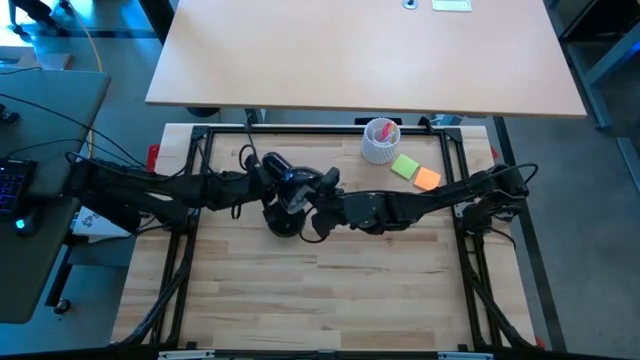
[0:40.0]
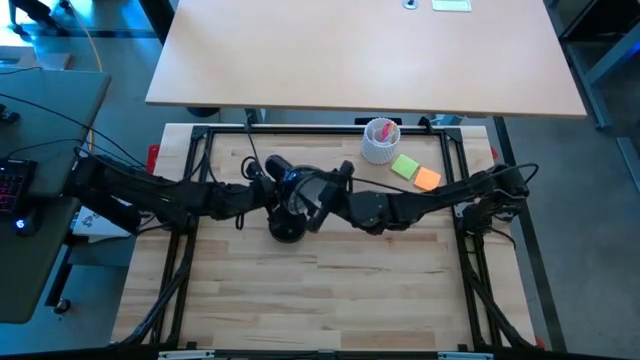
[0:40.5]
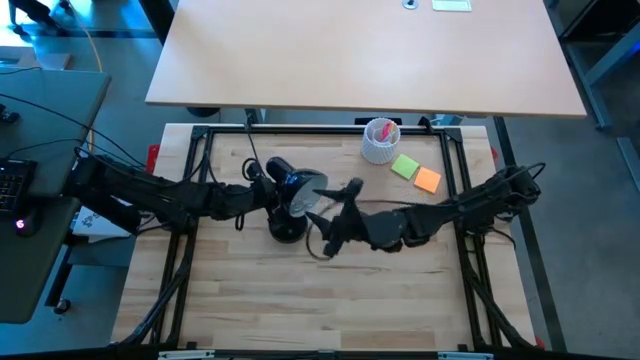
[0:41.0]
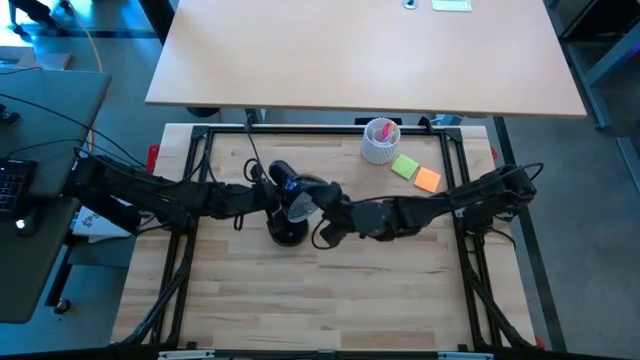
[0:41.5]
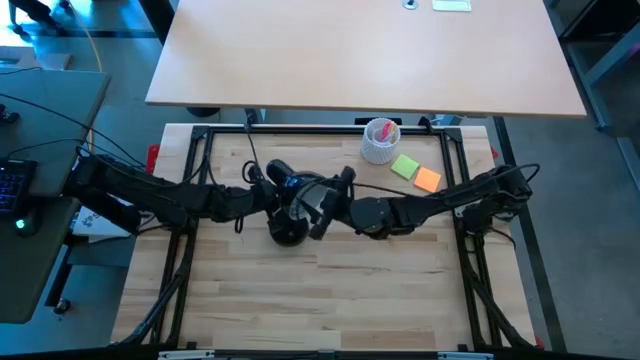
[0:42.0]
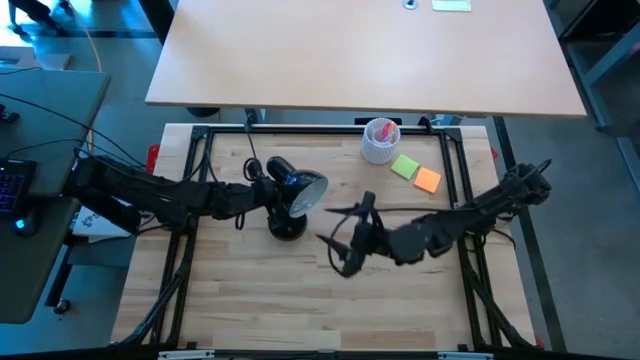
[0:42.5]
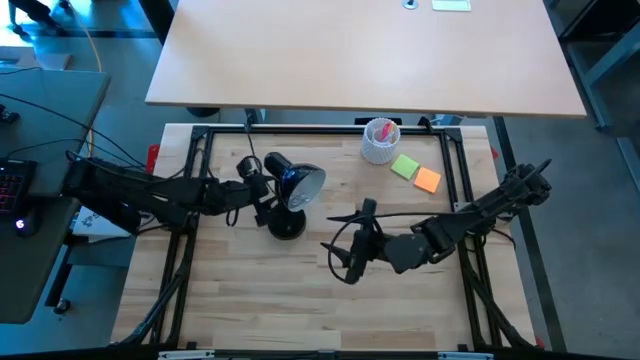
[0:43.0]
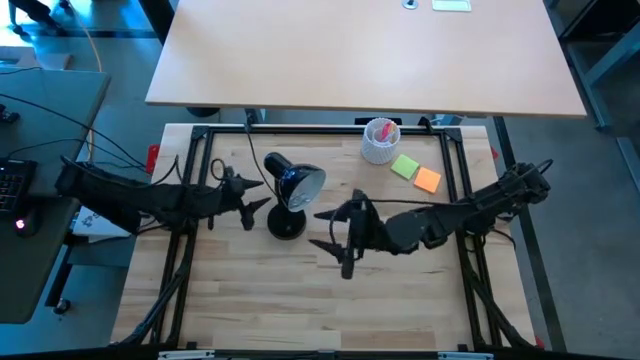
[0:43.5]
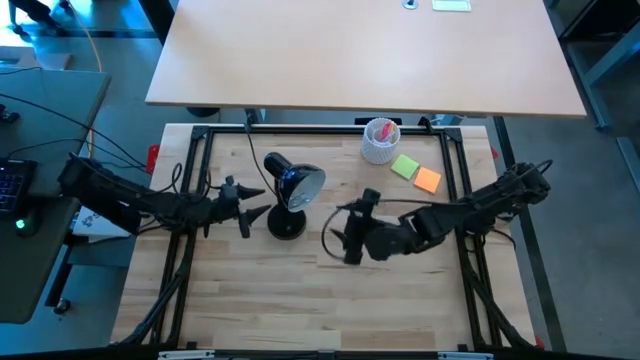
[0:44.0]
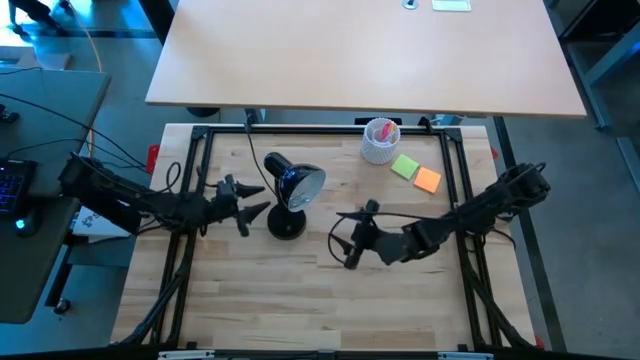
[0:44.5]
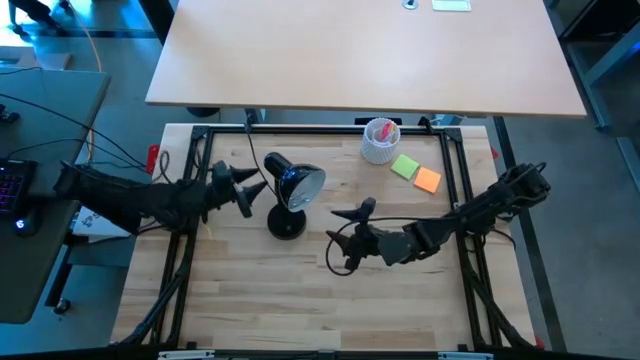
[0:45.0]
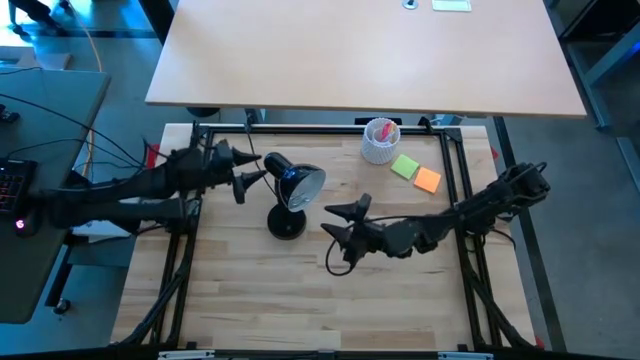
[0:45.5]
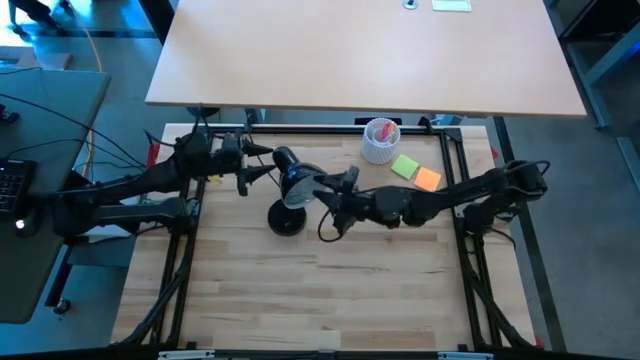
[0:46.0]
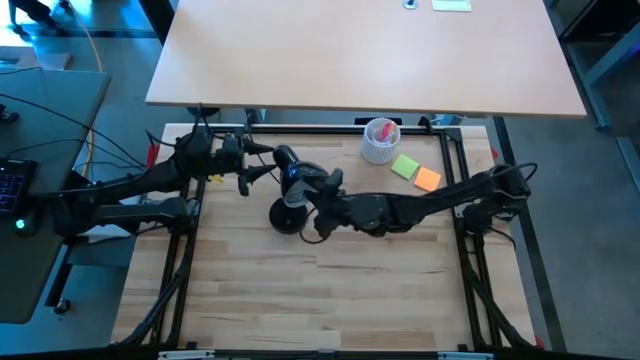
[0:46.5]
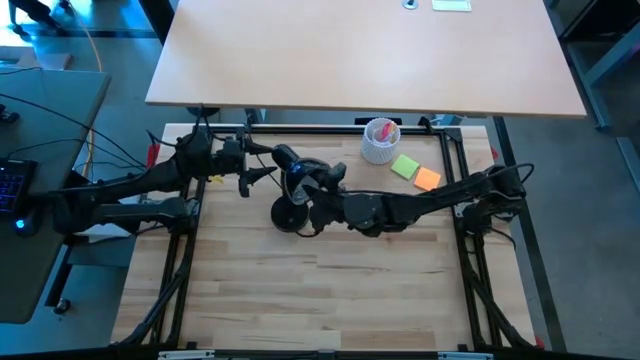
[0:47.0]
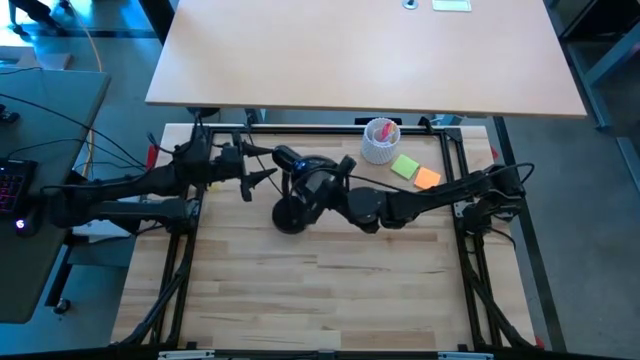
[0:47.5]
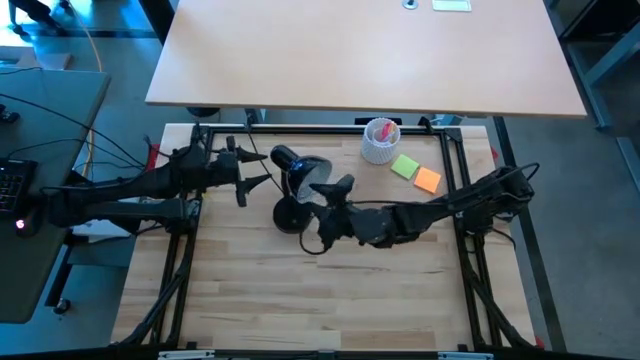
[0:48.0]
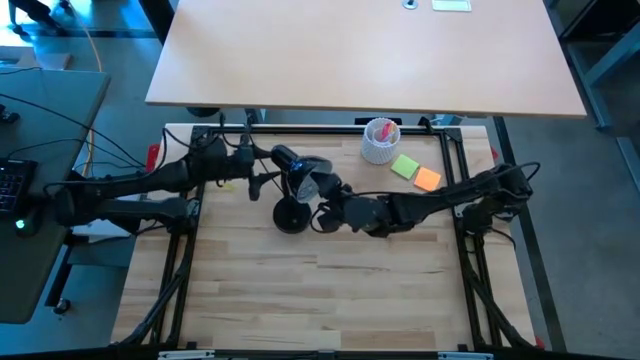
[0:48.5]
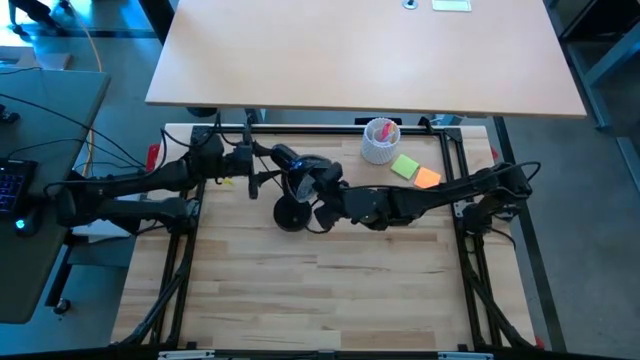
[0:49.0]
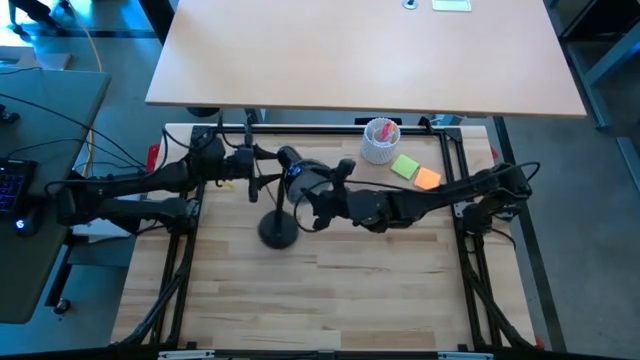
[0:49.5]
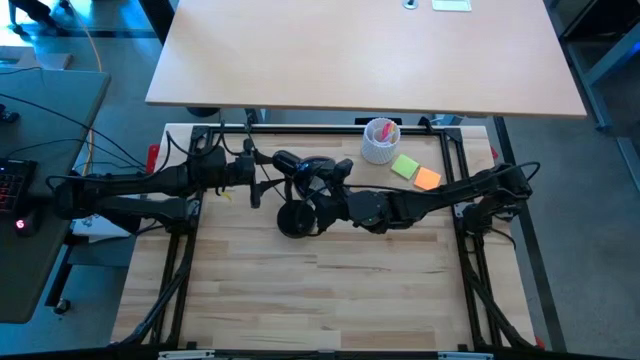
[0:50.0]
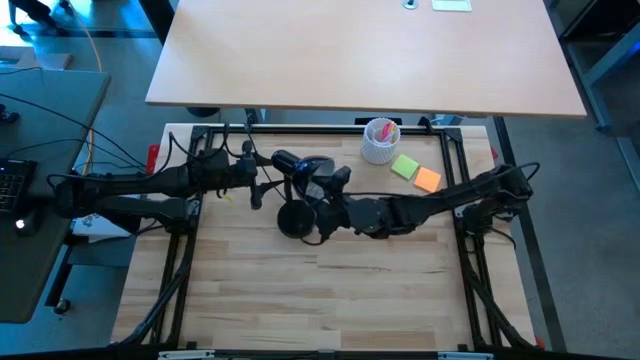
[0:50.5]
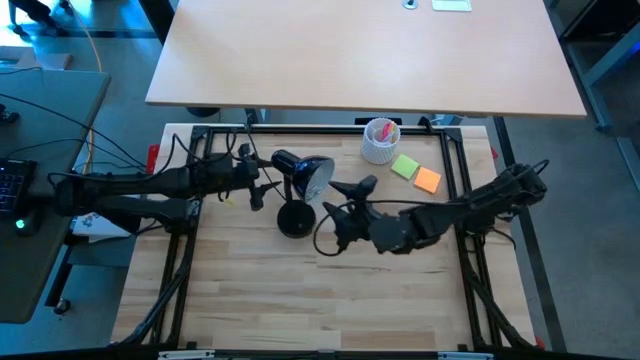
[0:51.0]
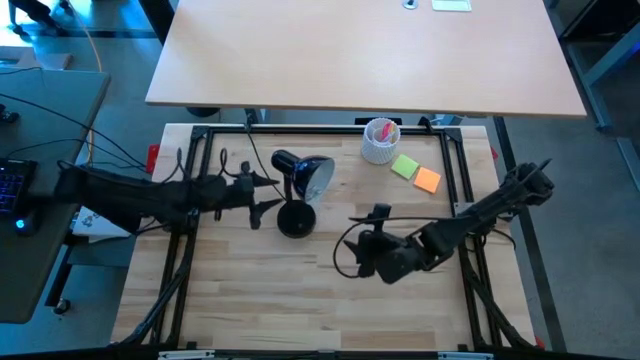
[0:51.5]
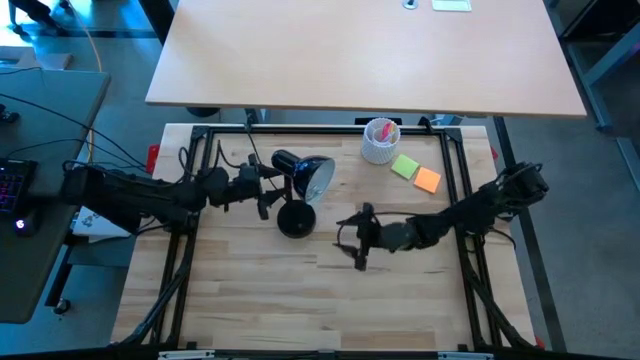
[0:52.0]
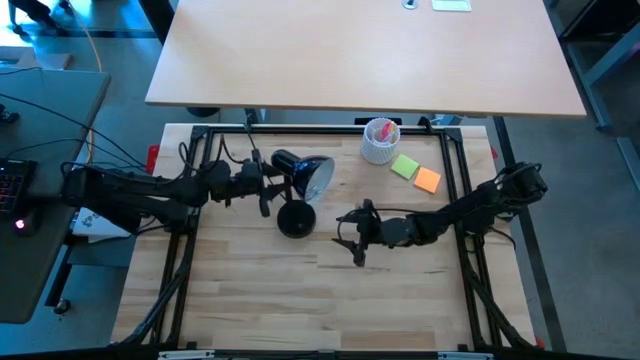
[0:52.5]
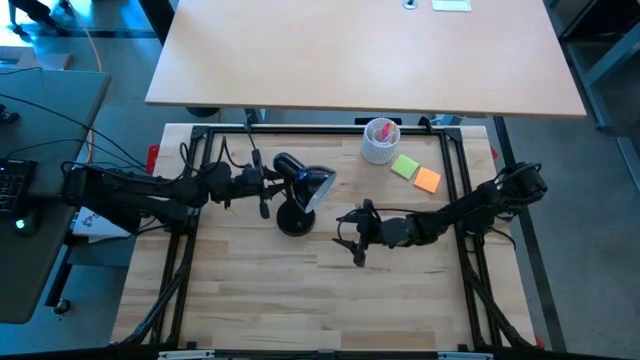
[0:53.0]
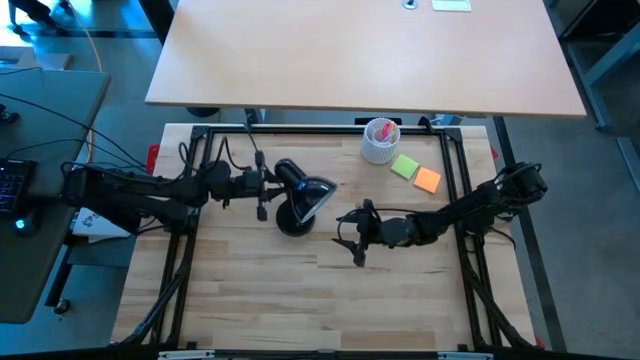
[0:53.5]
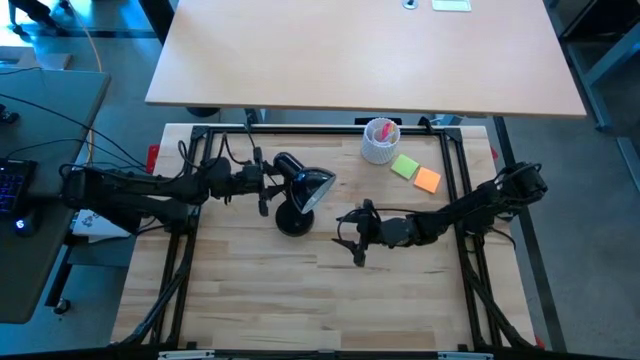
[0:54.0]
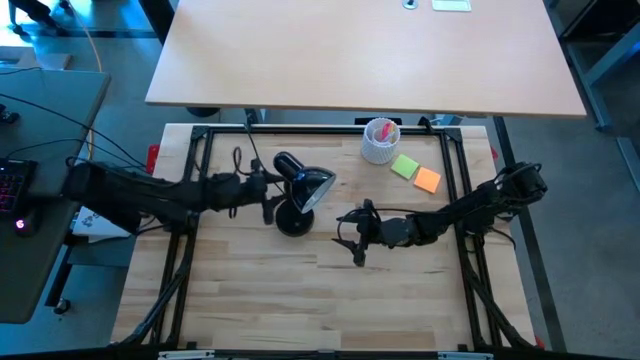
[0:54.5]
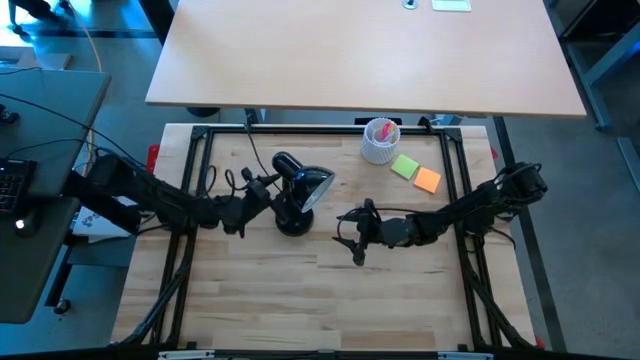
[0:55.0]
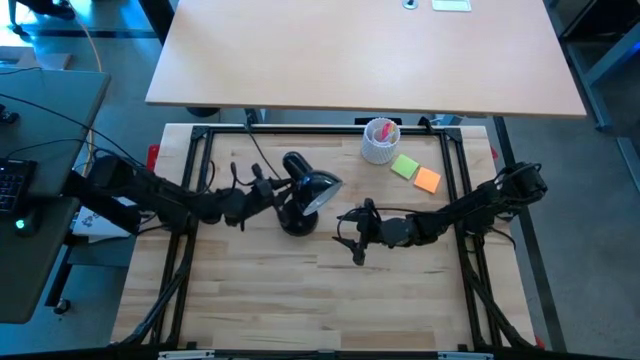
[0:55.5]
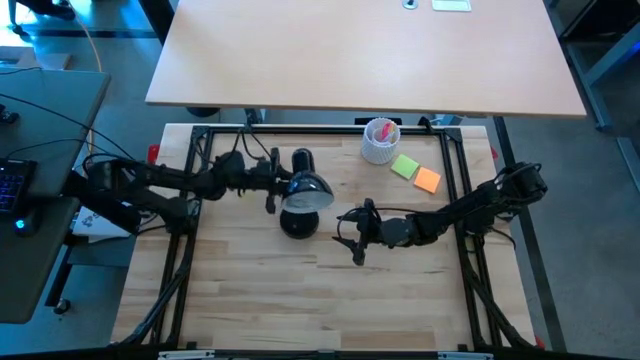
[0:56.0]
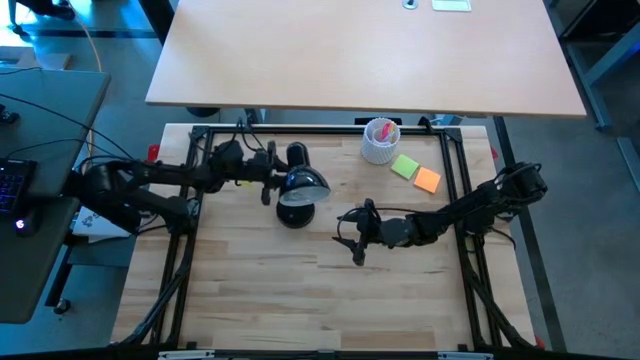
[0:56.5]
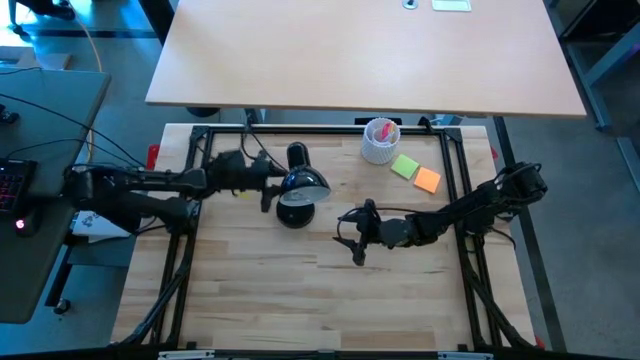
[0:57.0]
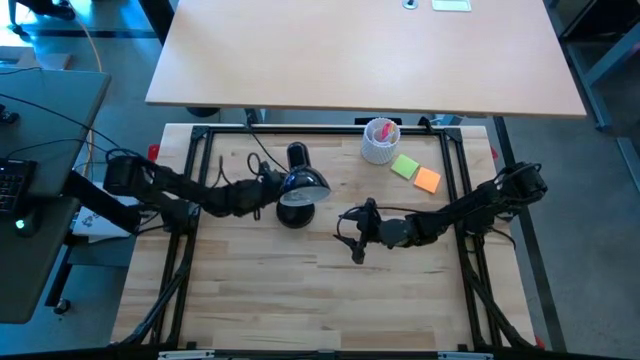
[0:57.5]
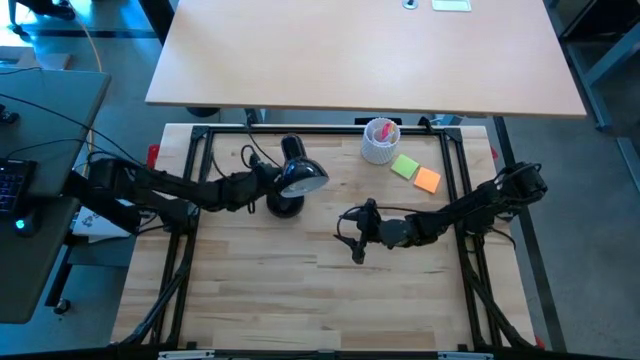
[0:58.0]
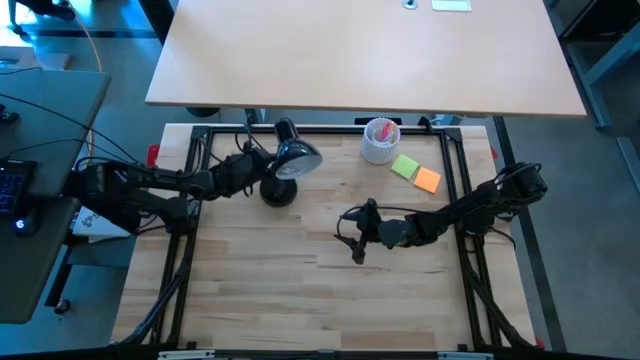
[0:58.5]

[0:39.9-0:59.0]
Task: Screw lightbulb
Insert the lightbulb into the lamp

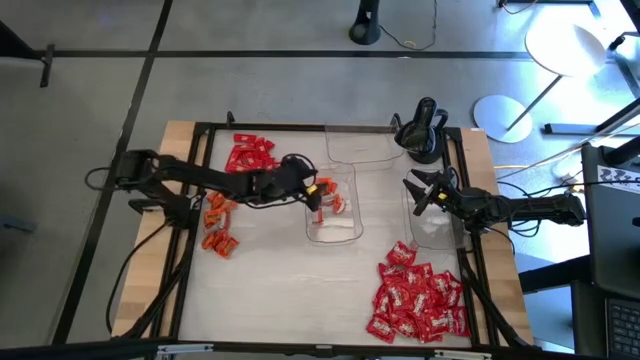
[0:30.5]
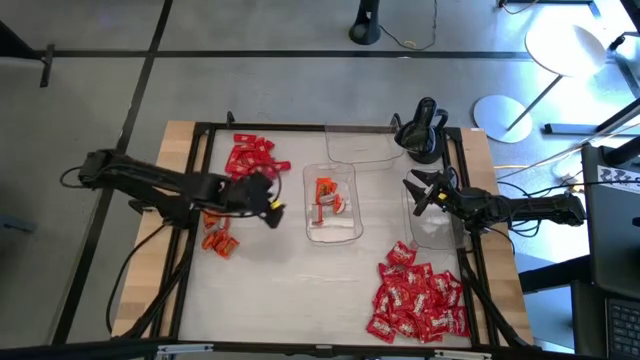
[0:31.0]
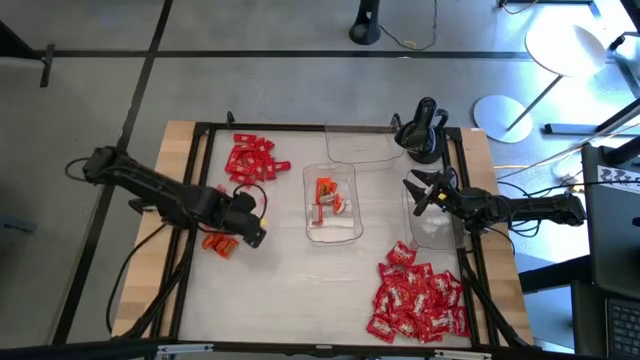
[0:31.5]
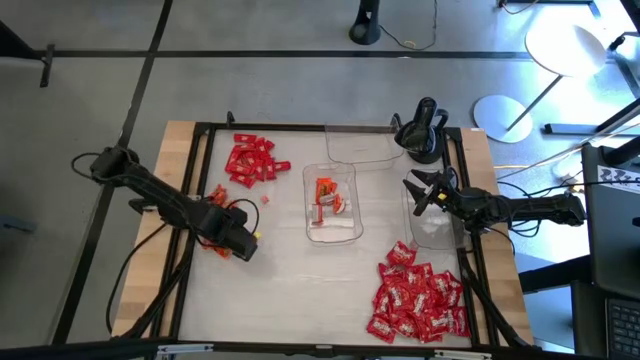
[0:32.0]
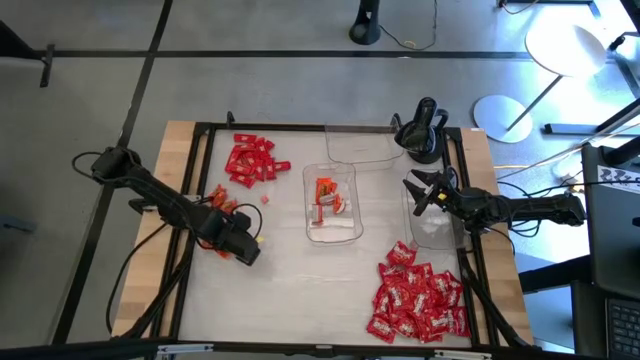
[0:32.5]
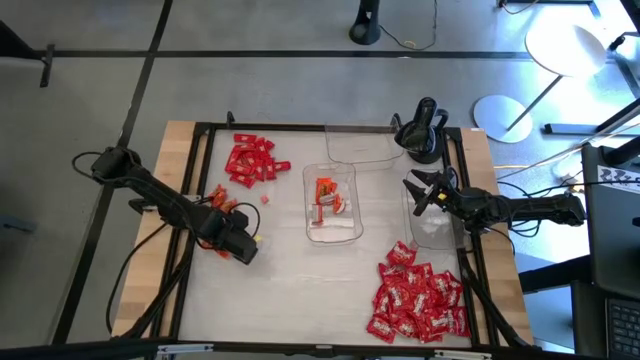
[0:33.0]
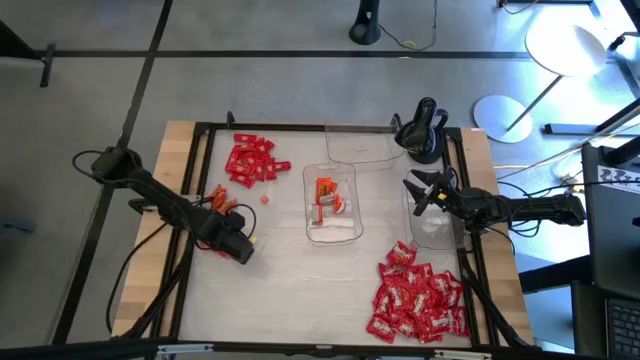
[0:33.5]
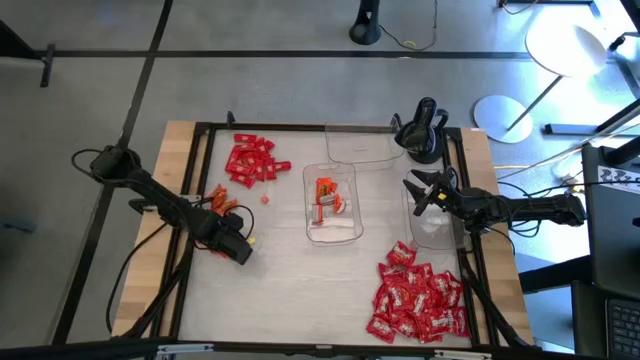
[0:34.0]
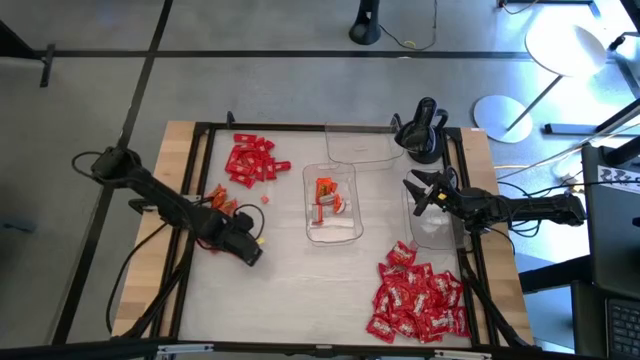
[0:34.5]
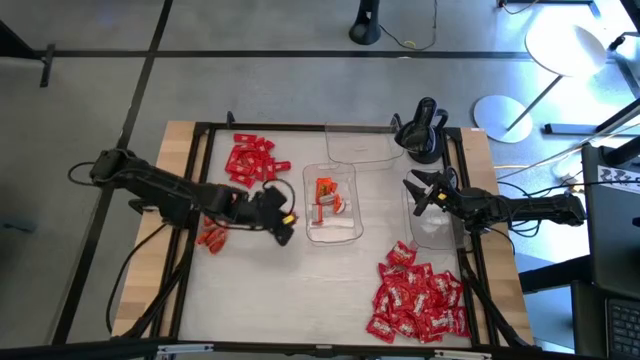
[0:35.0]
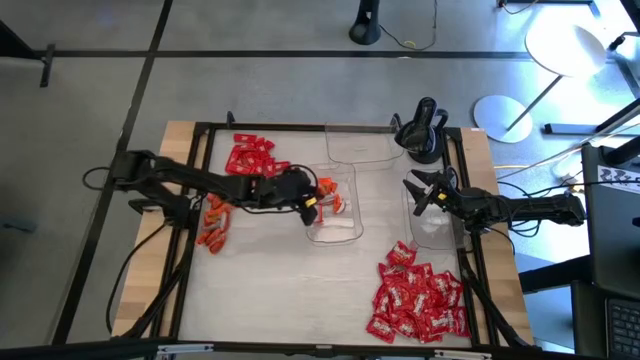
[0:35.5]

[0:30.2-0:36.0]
Task: Sort candy
Put the orange chocolate into the bottom left transparent bin
